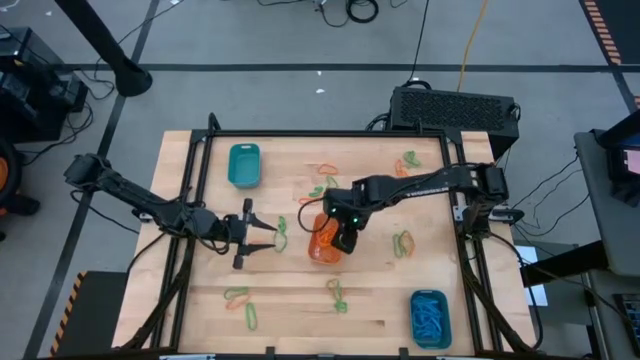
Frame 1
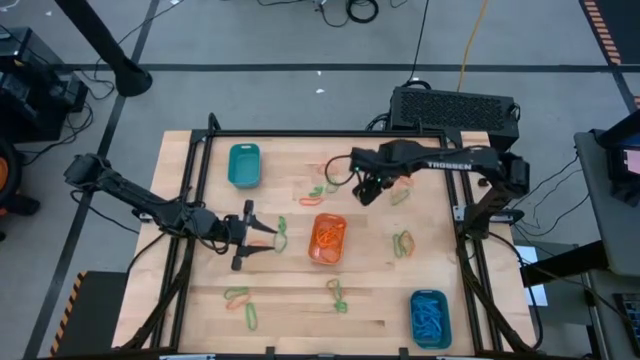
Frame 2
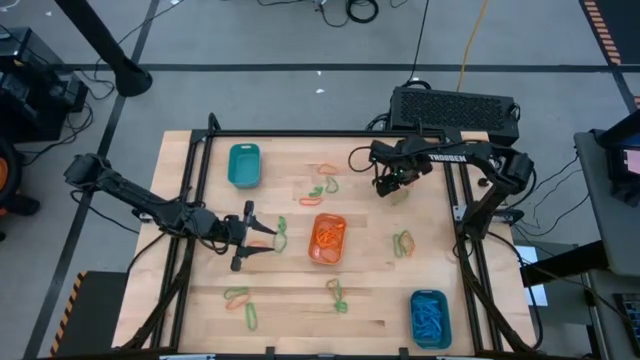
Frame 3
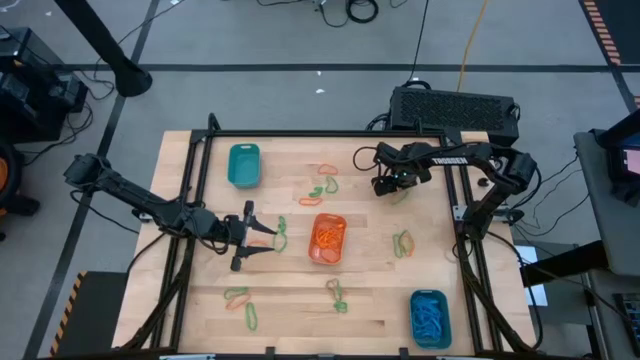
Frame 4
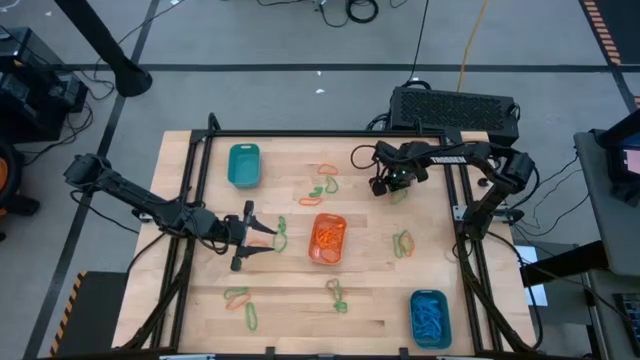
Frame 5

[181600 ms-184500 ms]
Task: Sort rubber bands into baskets
Put the orange rubber band into the orange bin

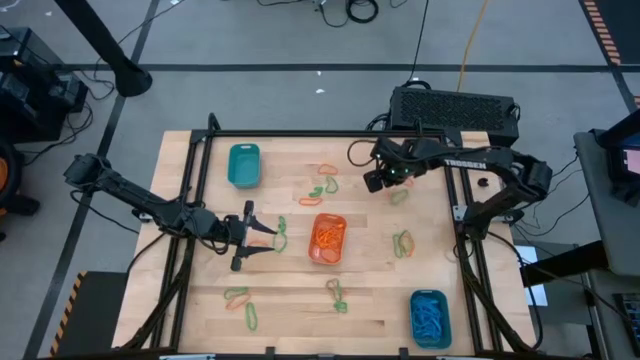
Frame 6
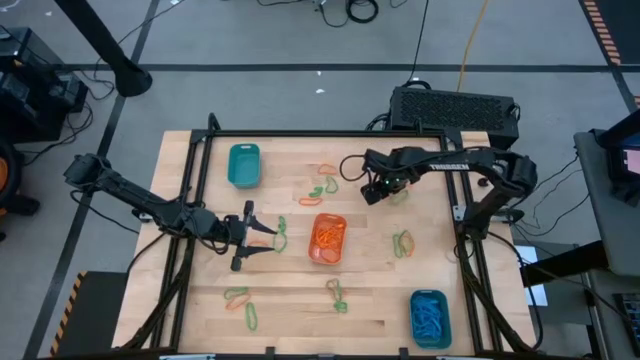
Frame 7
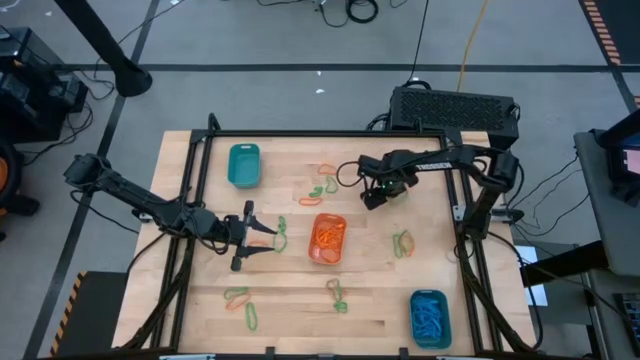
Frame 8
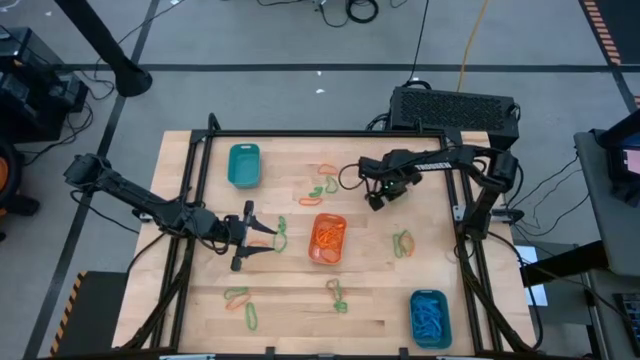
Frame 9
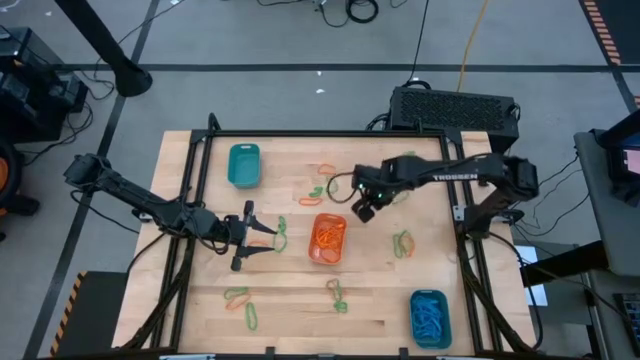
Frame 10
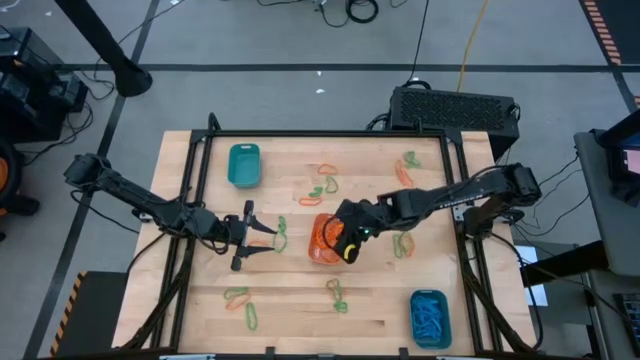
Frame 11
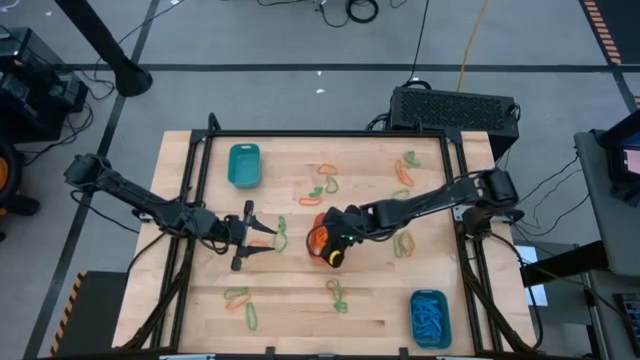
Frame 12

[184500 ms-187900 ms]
Put the orange rubber band into the orange bin

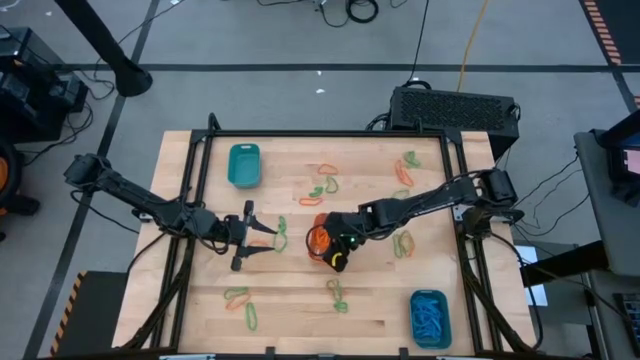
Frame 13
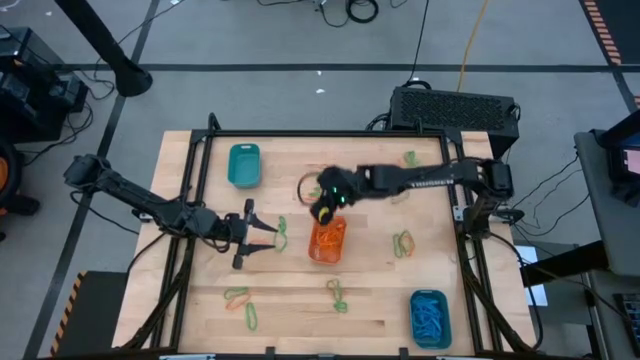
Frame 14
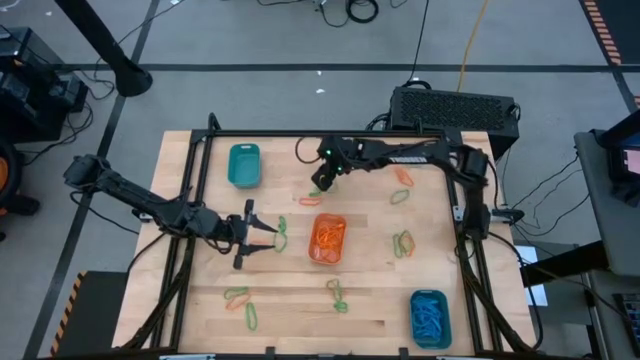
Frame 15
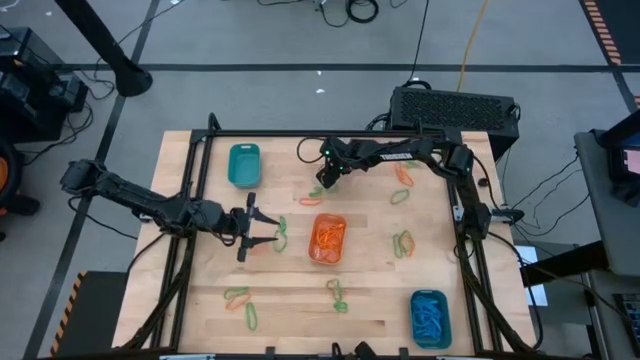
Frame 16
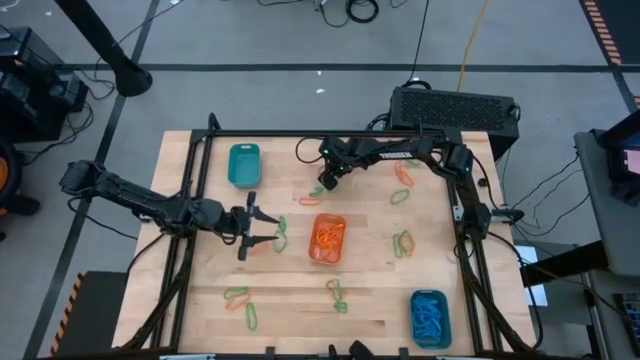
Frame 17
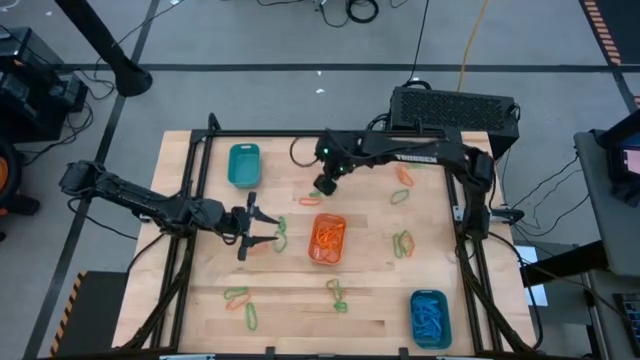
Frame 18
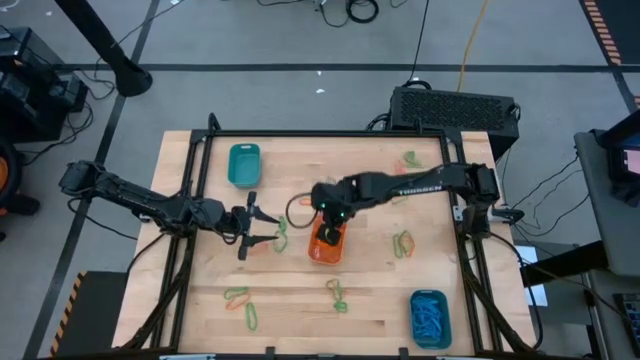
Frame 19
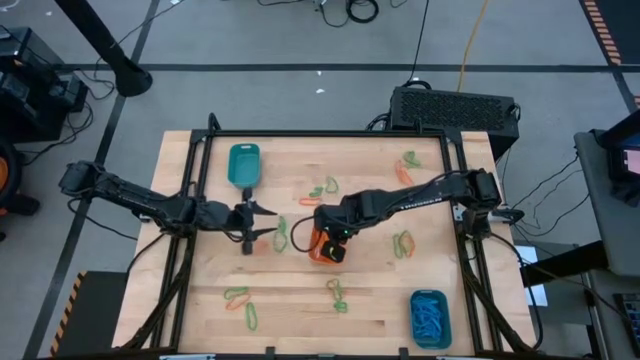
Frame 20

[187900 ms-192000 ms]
Put the orange rubber band into the orange bin

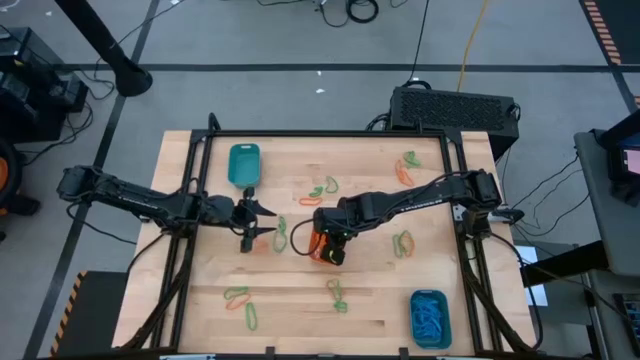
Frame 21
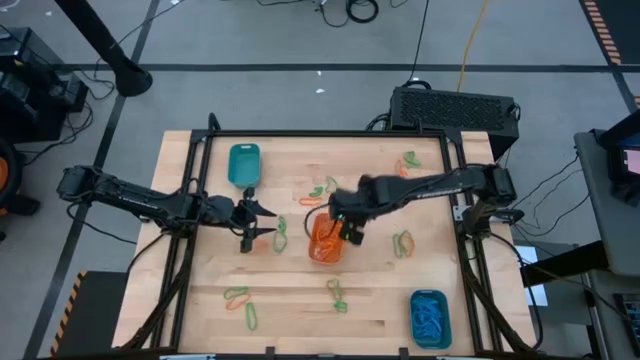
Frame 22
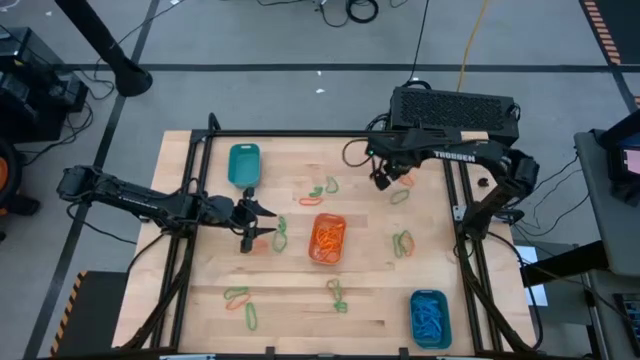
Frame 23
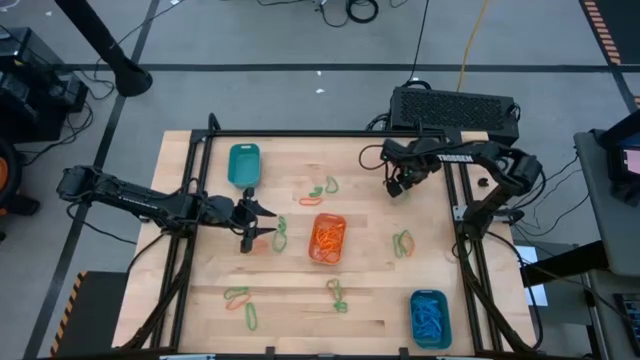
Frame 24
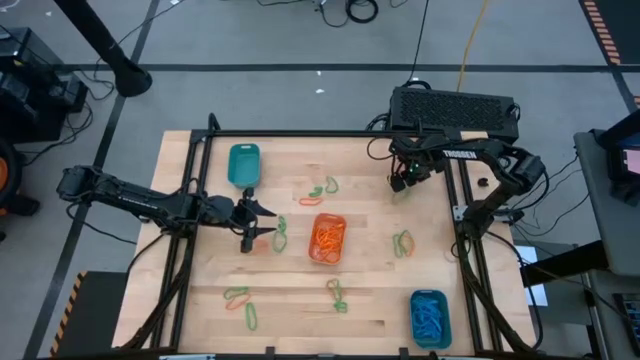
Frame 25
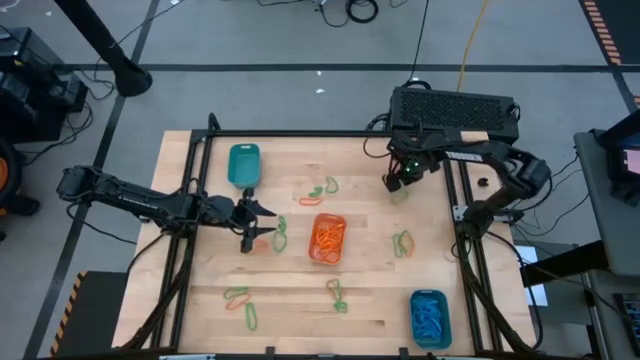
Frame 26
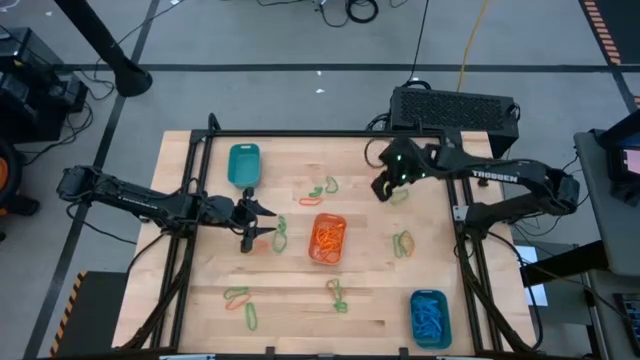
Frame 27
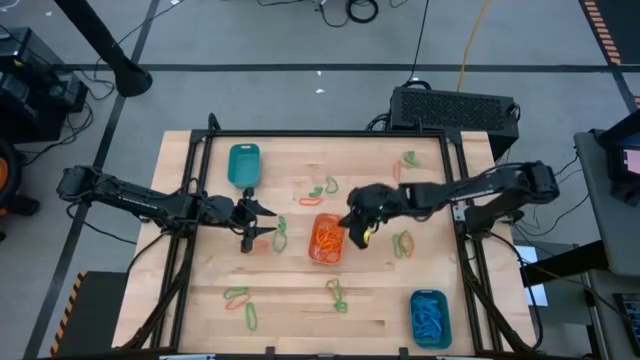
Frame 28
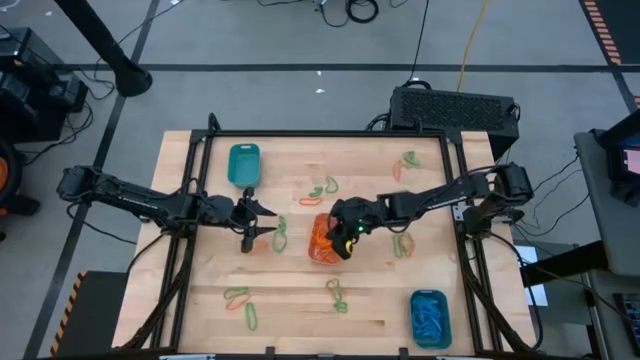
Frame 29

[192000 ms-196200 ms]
Put the orange rubber band into the orange bin

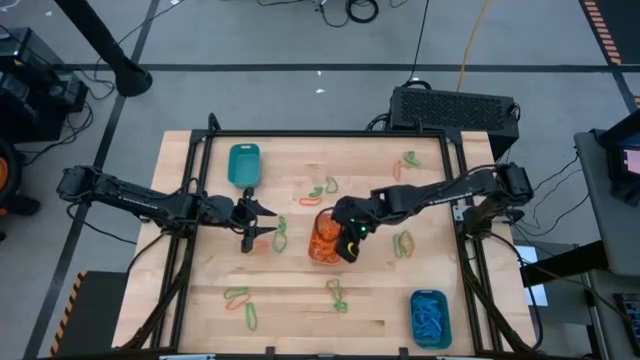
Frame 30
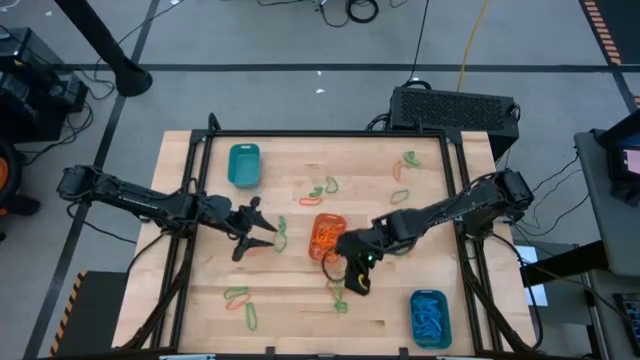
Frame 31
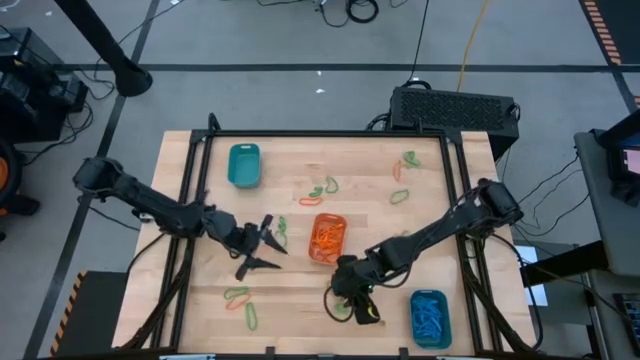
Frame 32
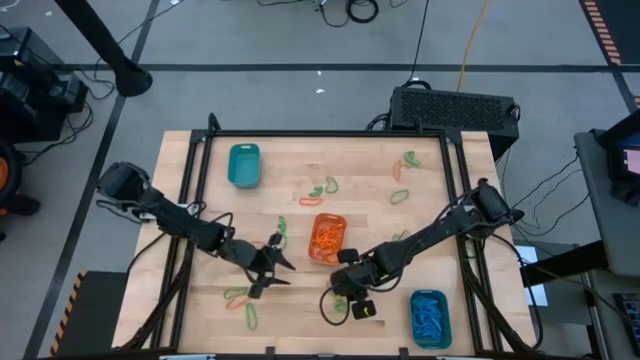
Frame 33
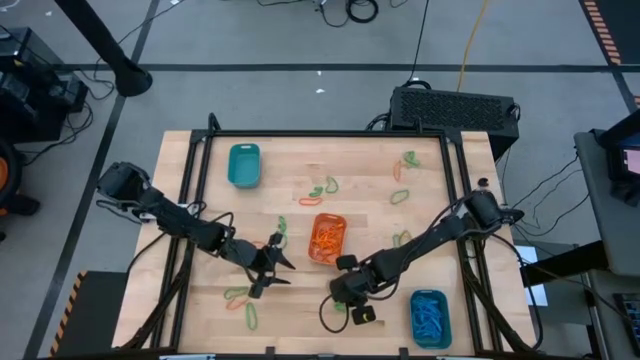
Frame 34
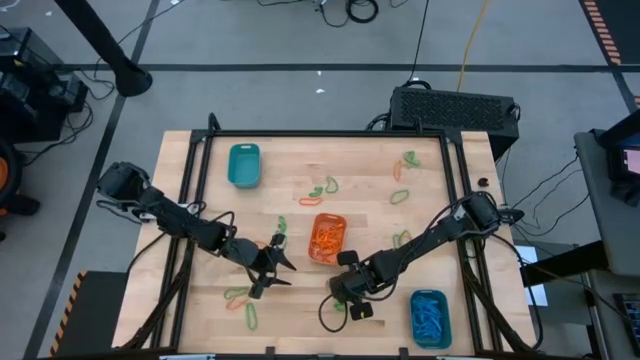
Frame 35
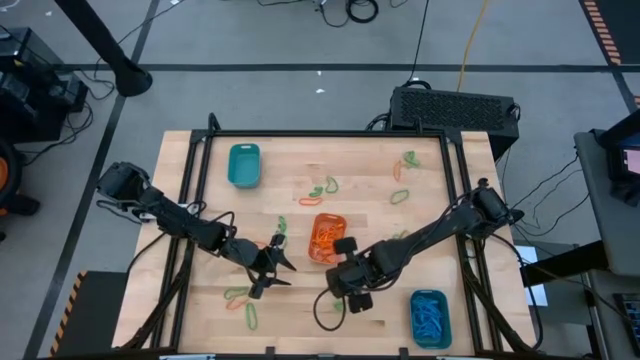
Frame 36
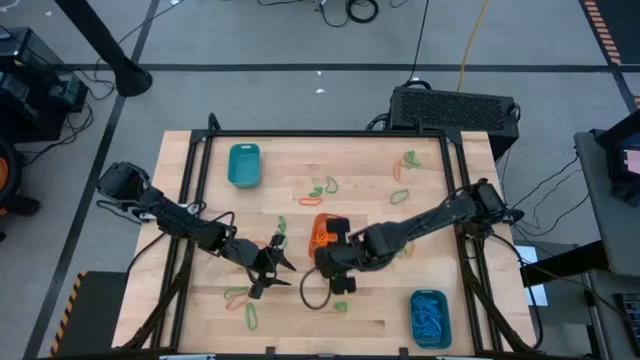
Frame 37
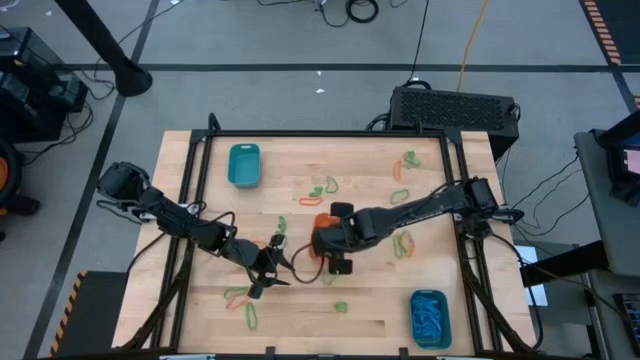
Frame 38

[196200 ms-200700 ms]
Put the orange rubber band into the orange bin

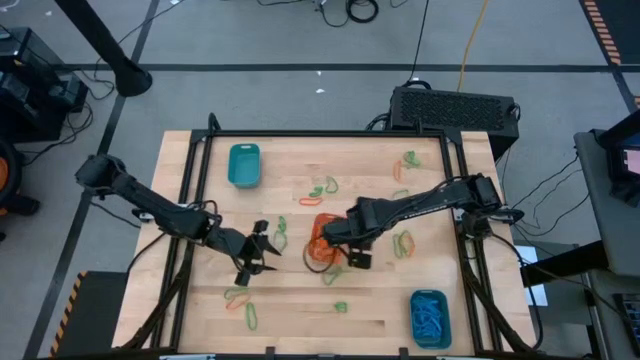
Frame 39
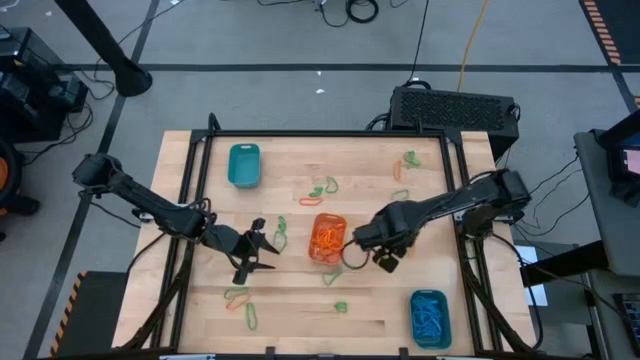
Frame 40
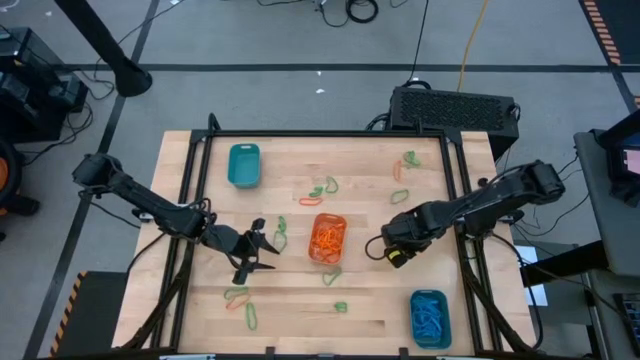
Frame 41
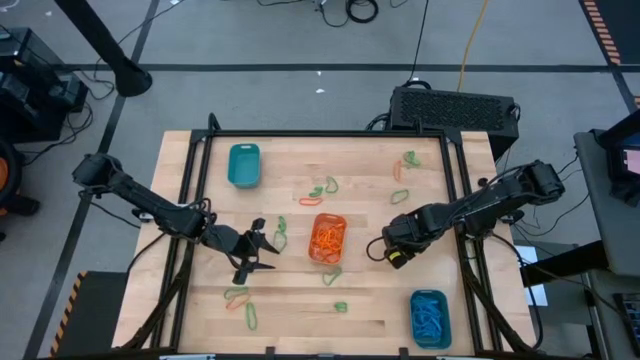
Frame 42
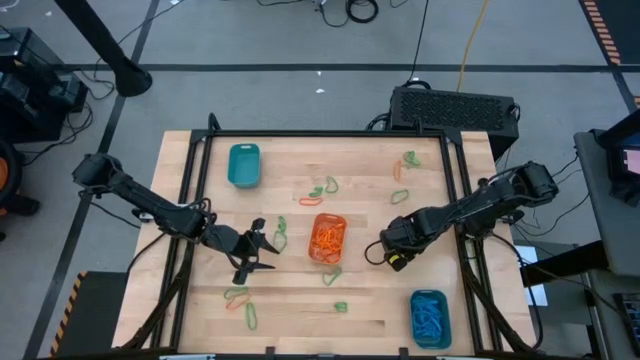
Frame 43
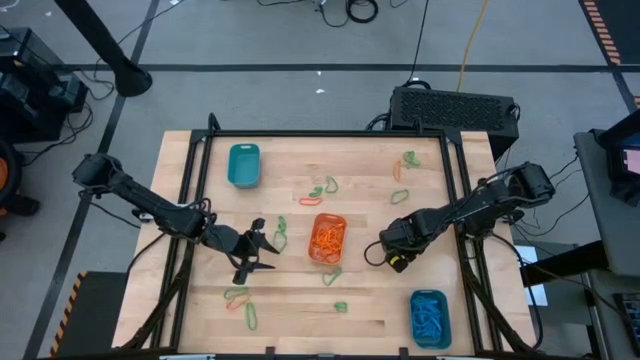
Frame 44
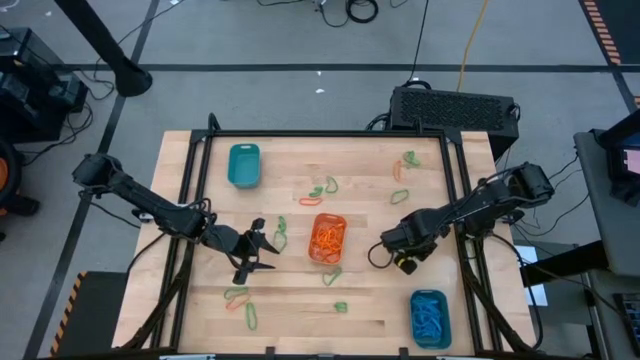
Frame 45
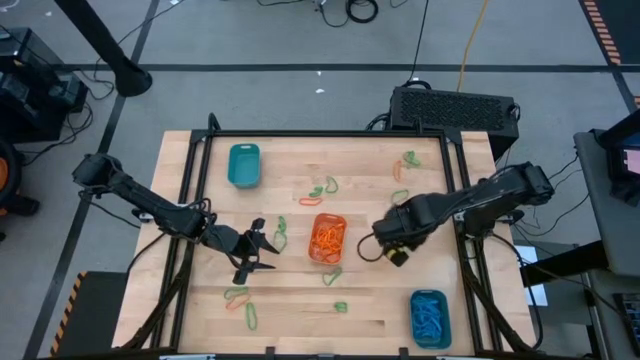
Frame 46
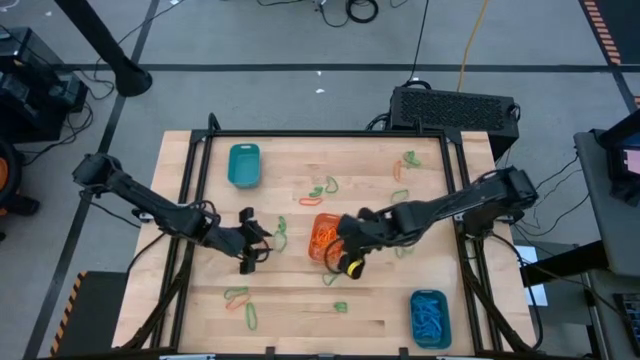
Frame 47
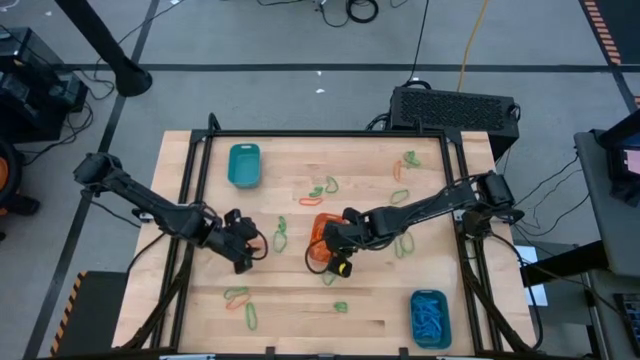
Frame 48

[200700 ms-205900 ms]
Put the orange rubber band into the orange bin
